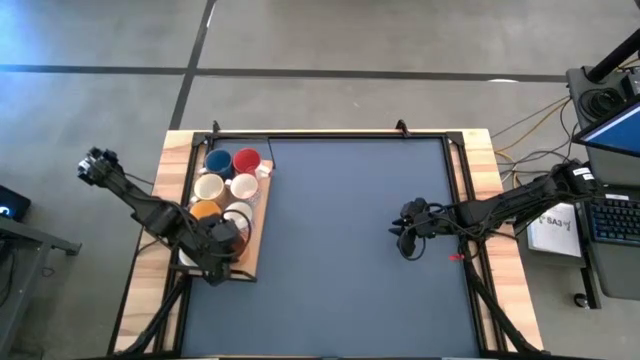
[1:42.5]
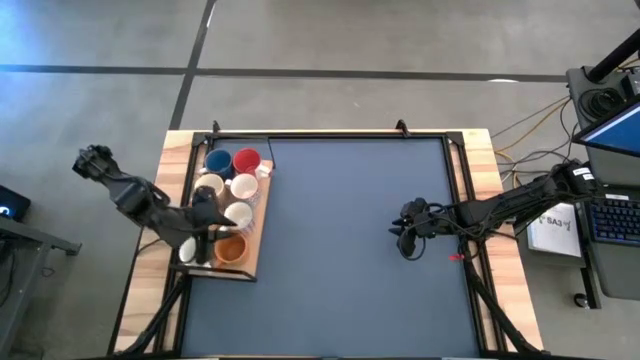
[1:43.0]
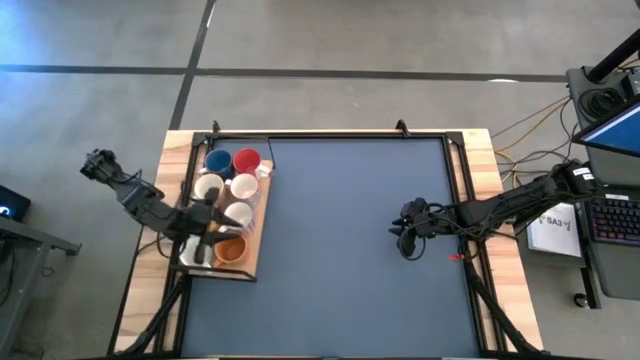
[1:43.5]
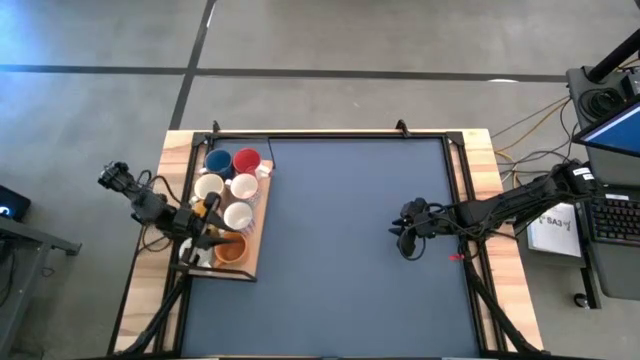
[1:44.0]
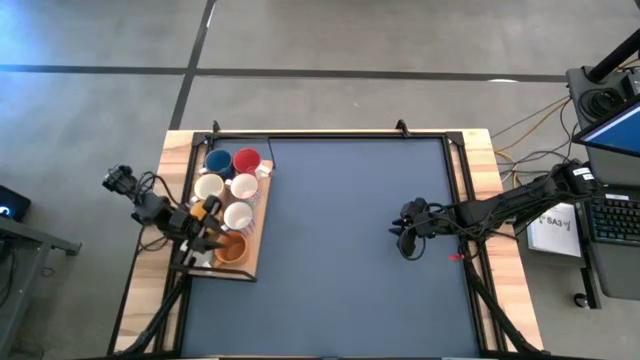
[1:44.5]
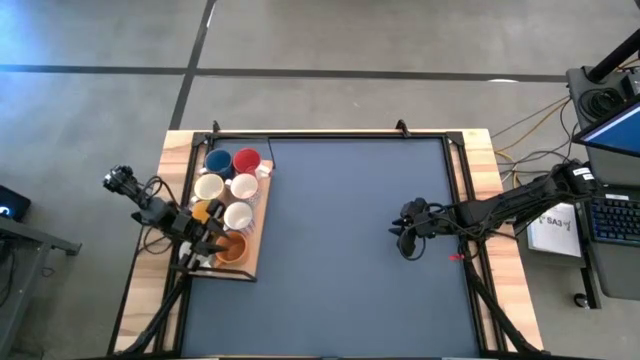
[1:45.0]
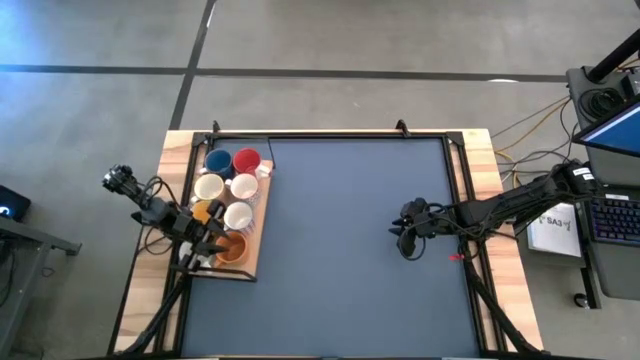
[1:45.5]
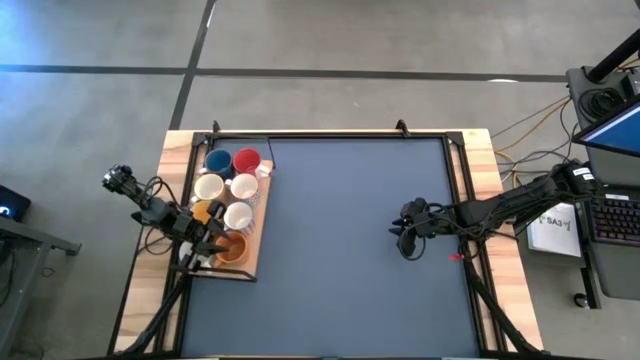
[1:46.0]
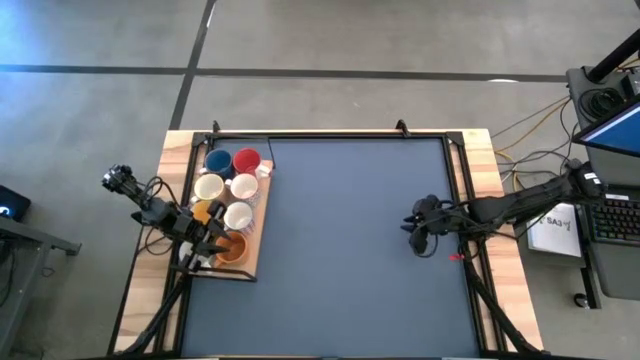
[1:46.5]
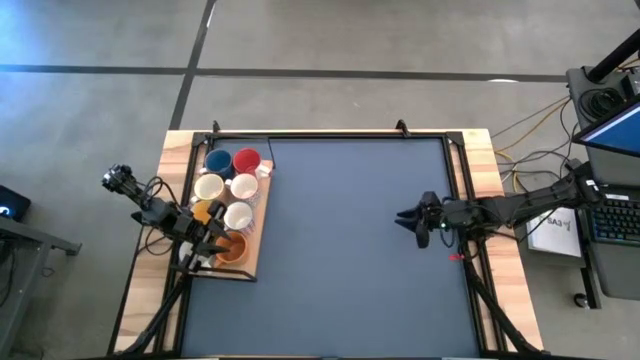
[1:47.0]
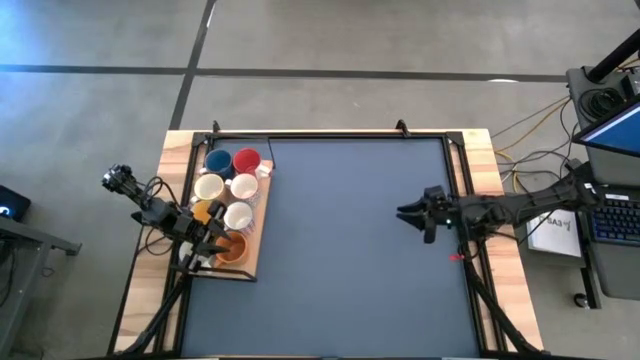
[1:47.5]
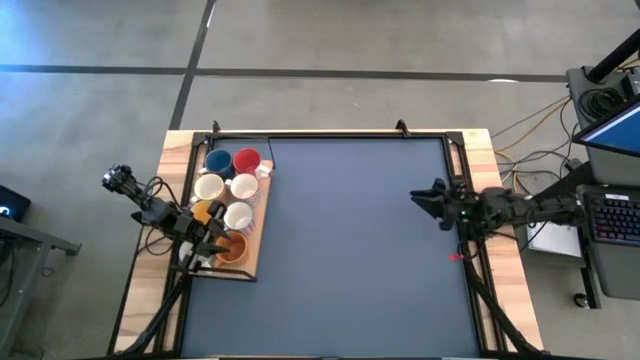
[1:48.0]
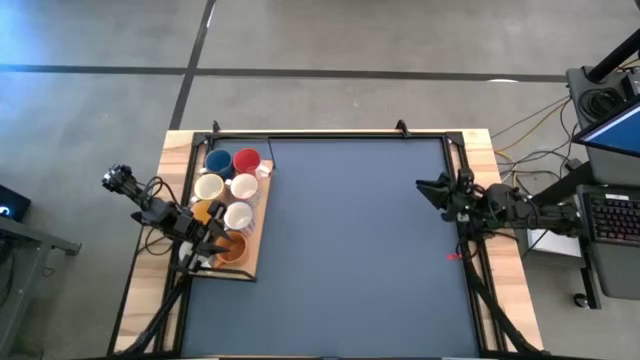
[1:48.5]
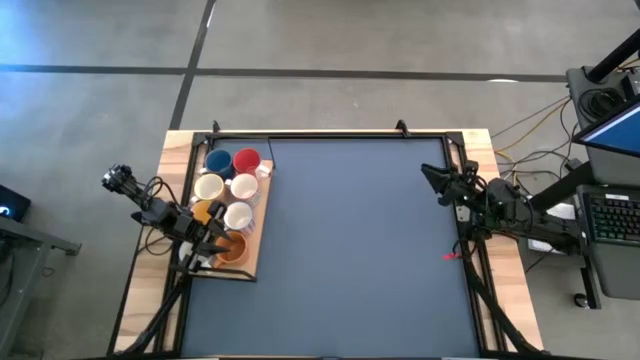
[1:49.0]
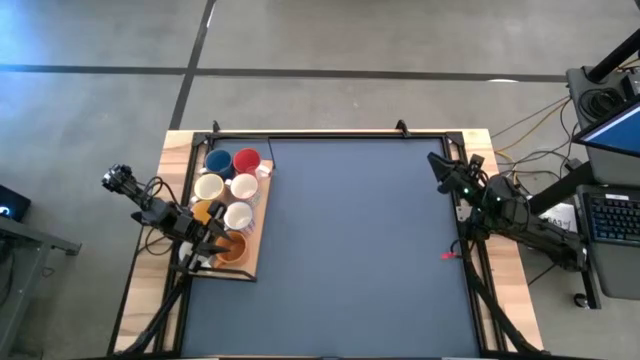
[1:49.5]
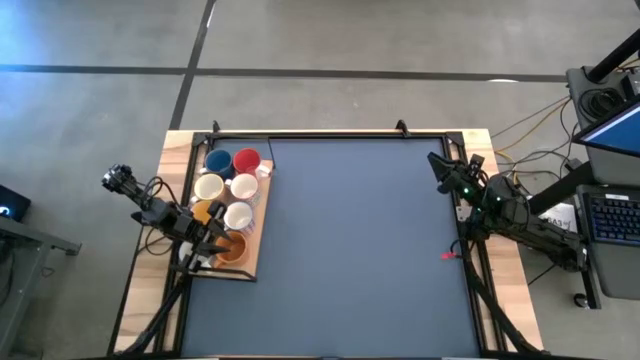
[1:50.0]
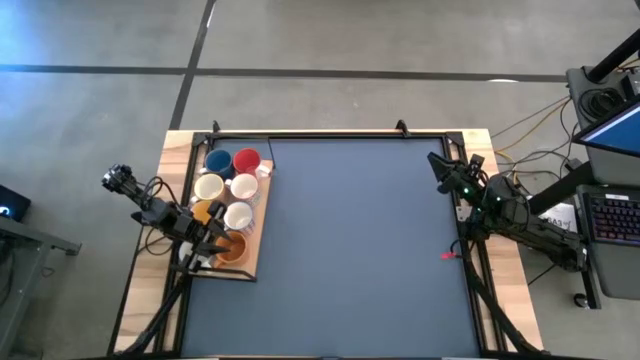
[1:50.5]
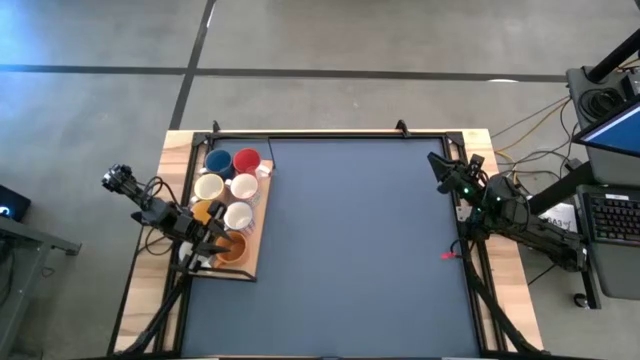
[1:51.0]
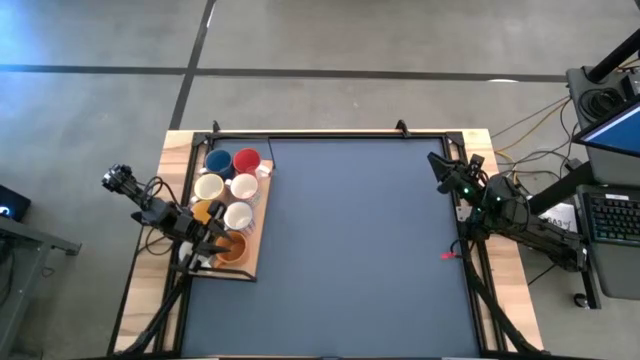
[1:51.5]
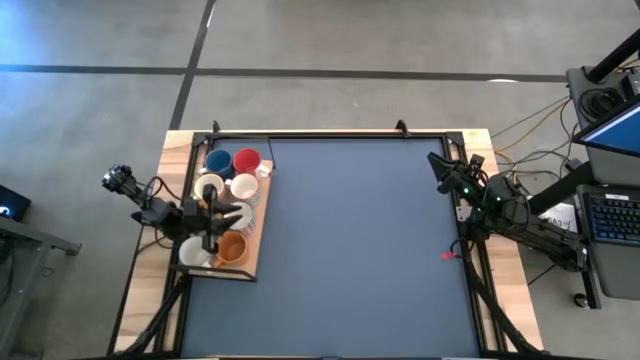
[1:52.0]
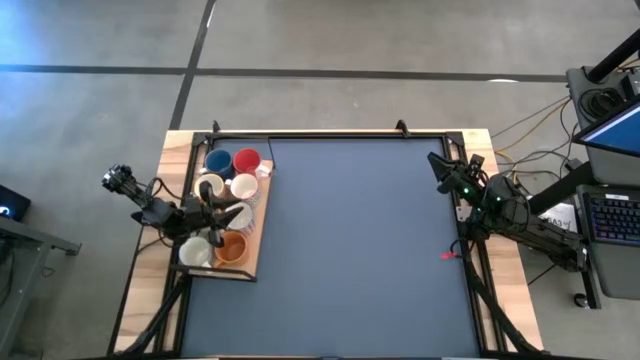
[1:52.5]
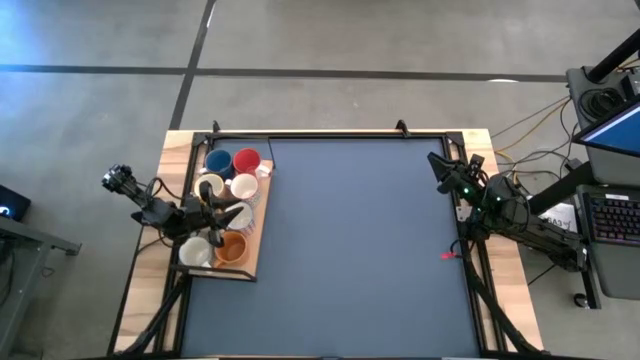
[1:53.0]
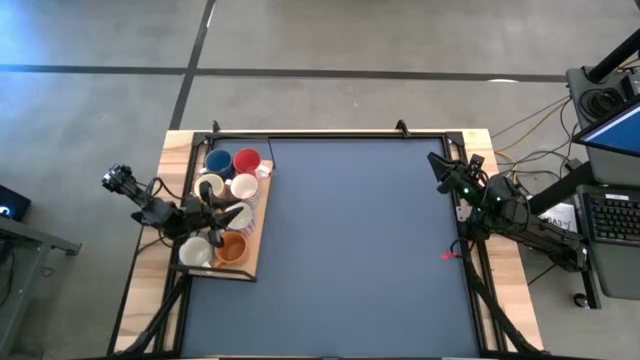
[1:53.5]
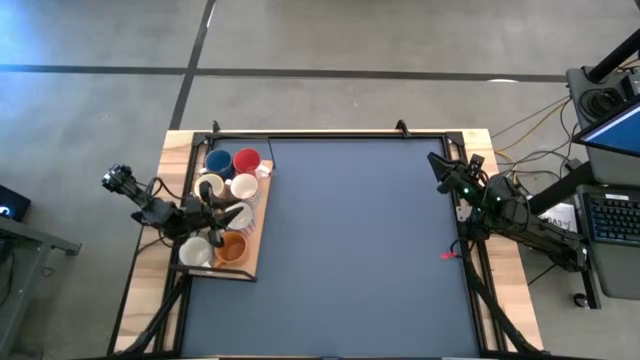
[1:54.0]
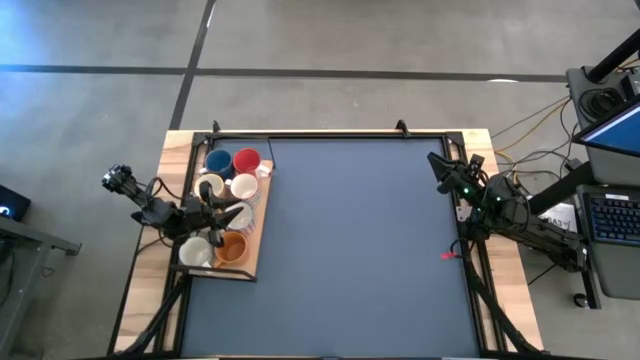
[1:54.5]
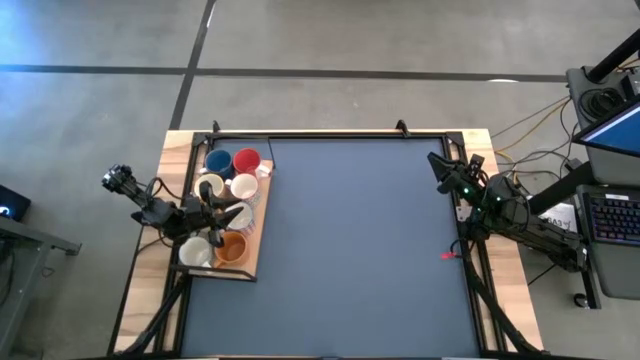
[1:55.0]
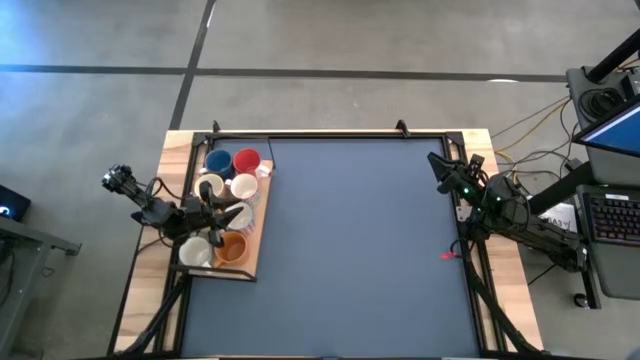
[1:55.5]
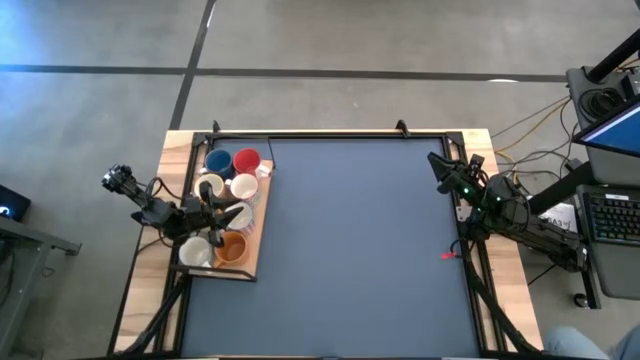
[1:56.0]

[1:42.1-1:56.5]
Task: Place coffee mugs
Return to home position

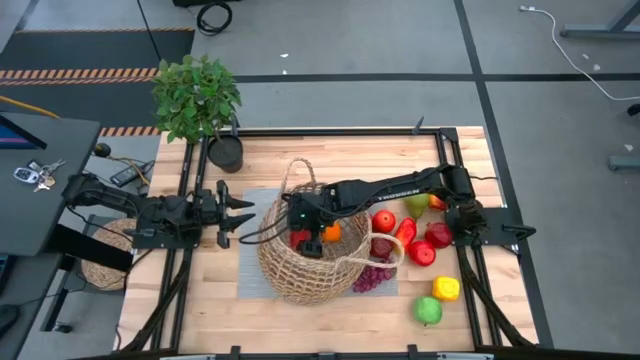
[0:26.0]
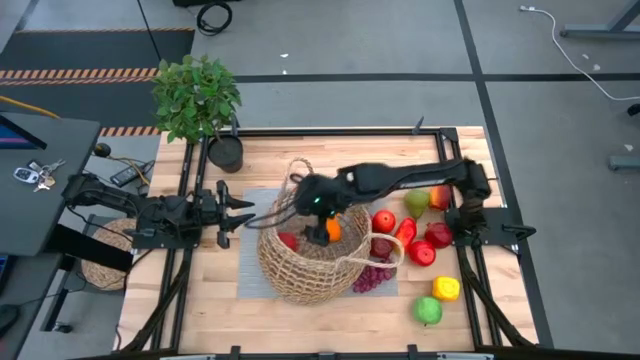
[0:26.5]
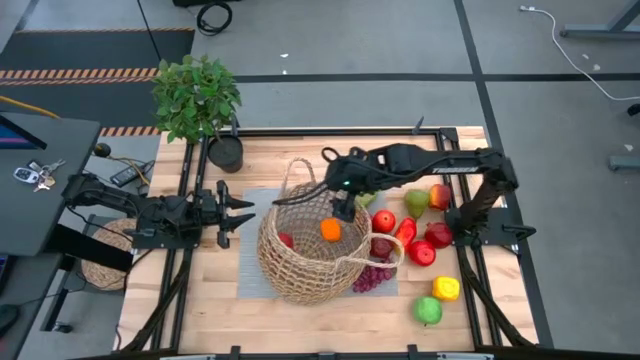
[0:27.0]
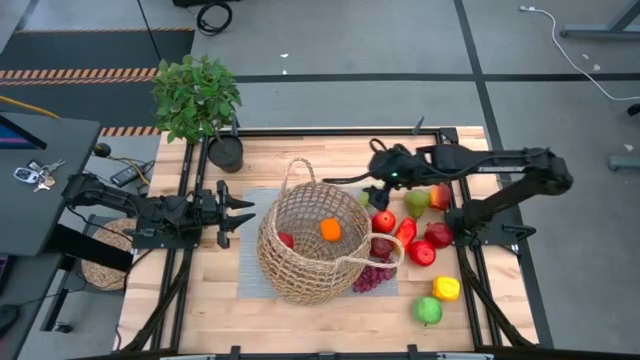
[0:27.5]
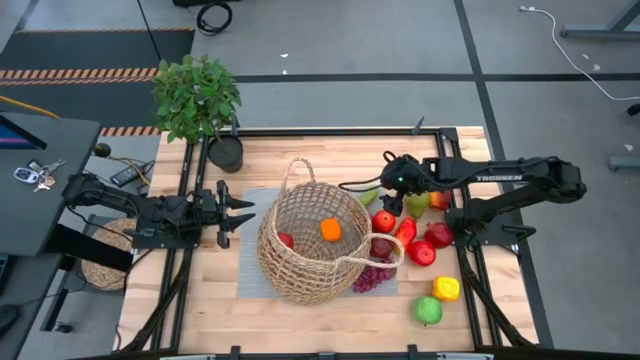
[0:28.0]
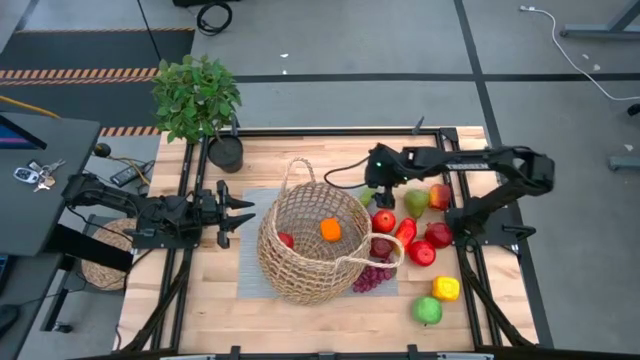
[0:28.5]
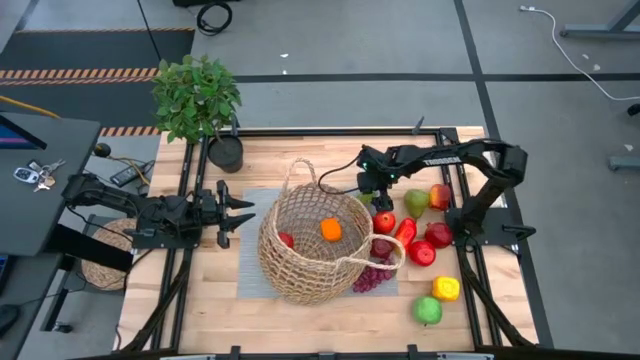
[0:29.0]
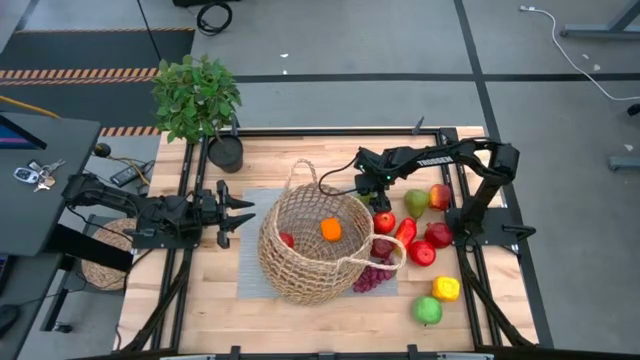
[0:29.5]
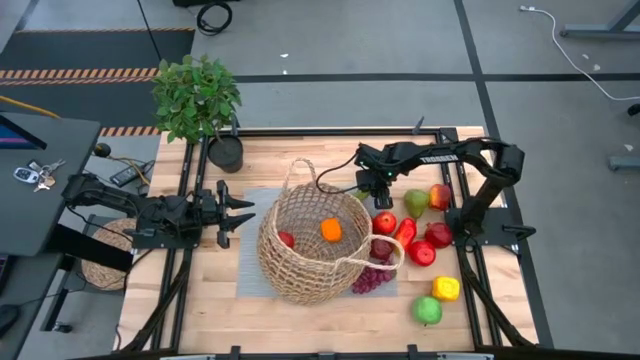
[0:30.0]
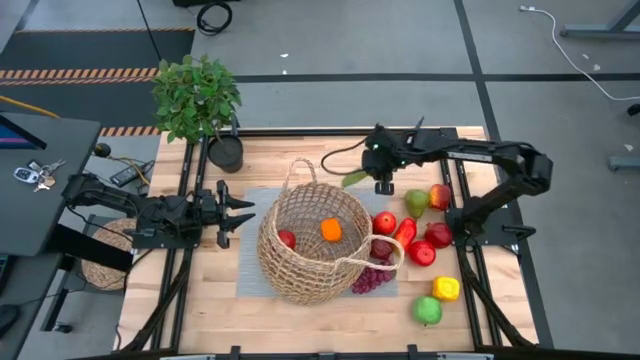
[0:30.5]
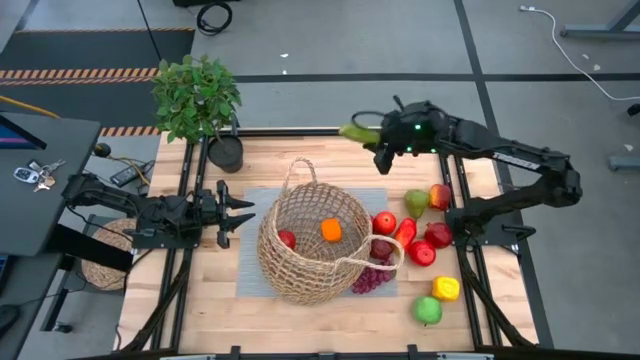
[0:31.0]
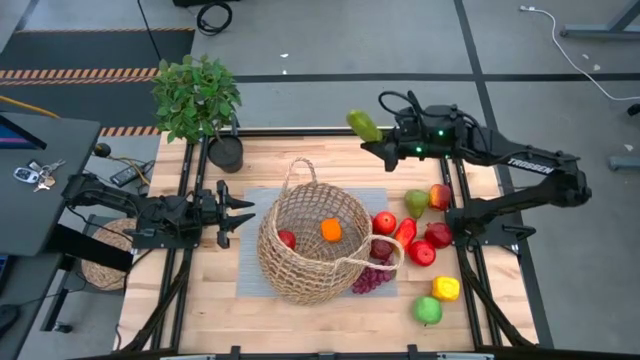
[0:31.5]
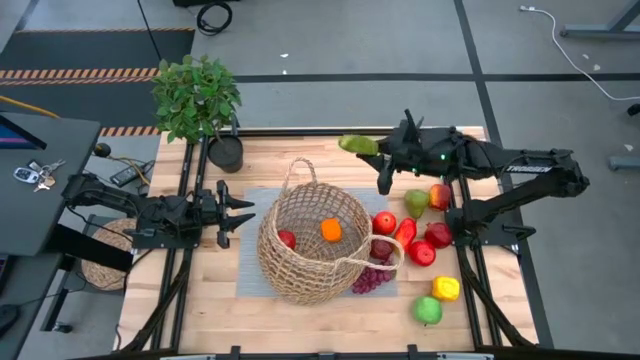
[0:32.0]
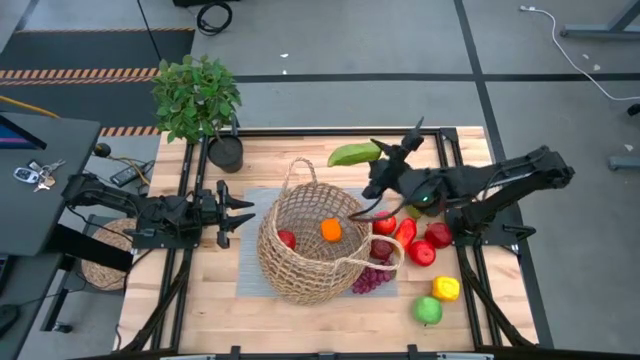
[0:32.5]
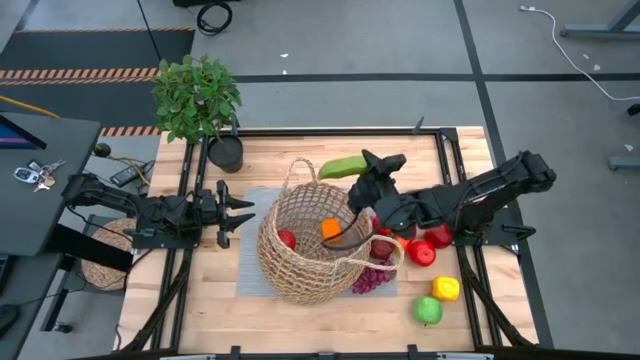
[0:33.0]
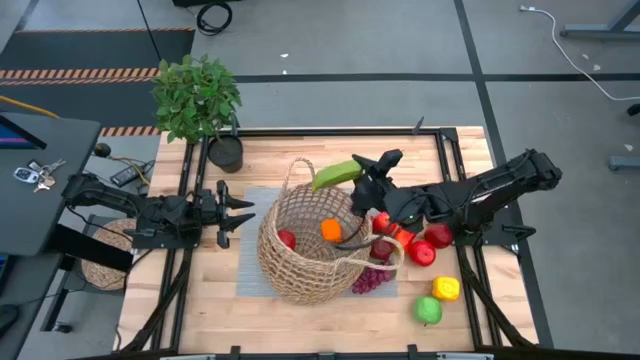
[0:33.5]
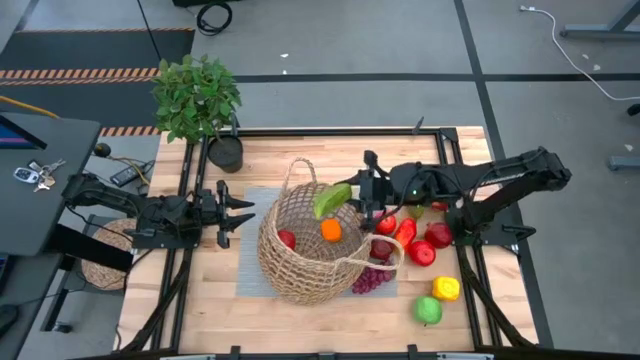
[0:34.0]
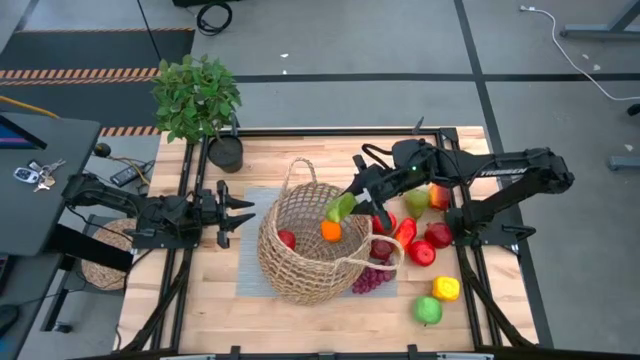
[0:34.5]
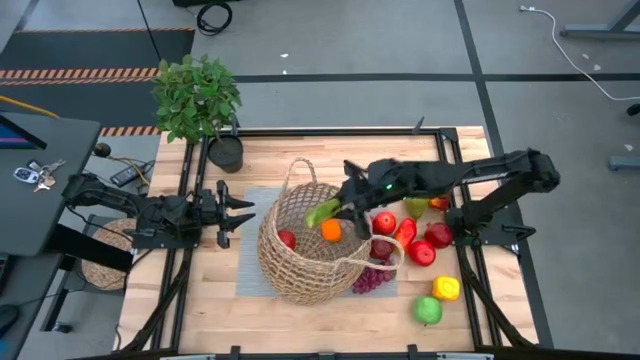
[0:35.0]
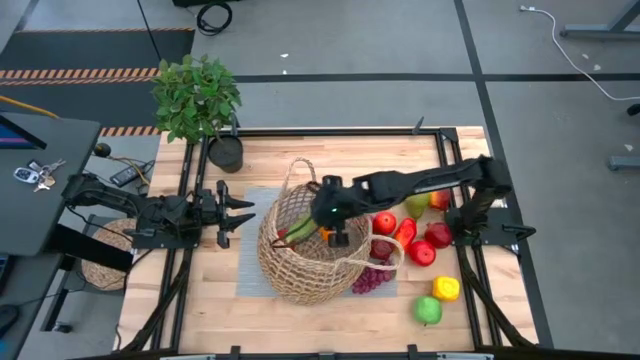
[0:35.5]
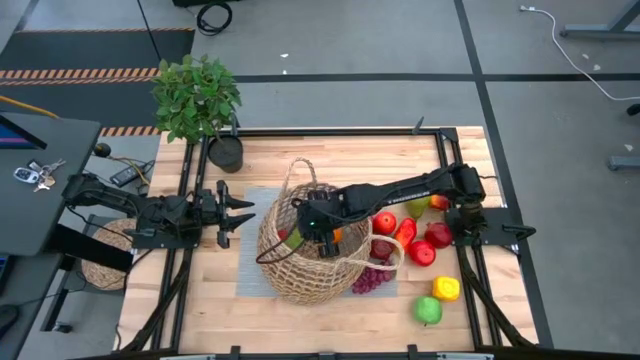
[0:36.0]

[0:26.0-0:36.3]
Task: Build produce basket
Put the cucumber into the basket
